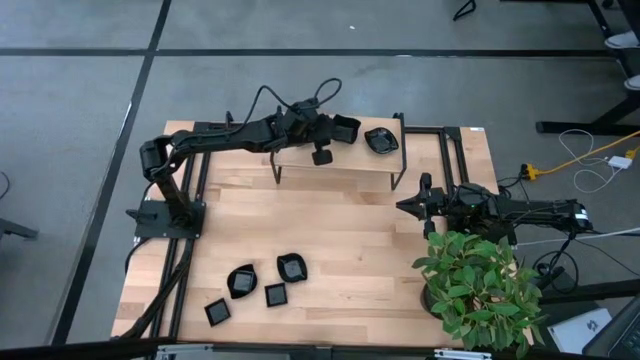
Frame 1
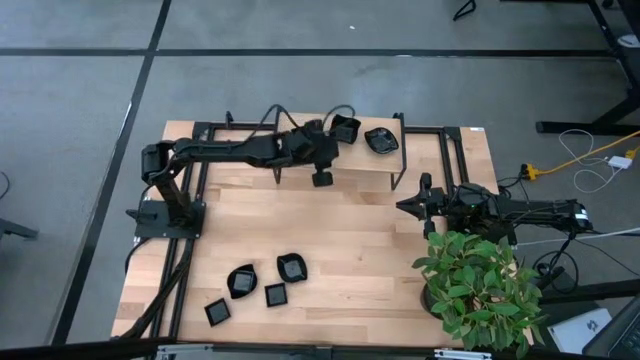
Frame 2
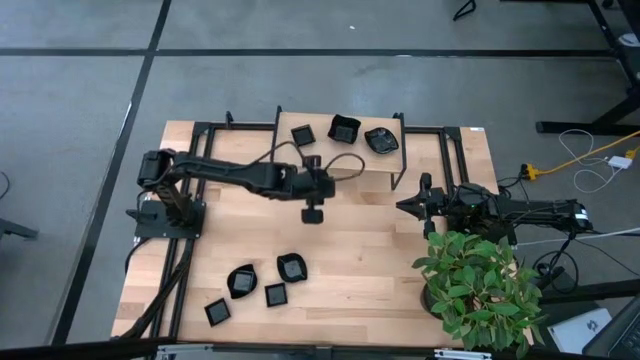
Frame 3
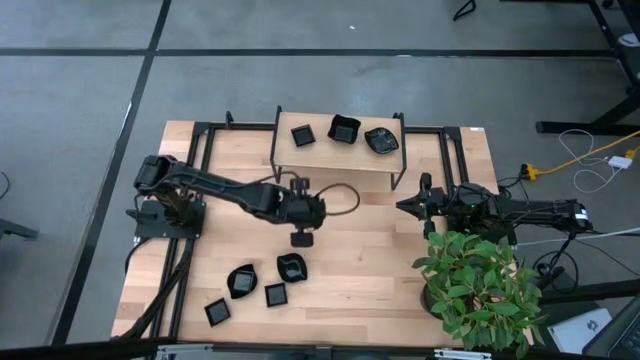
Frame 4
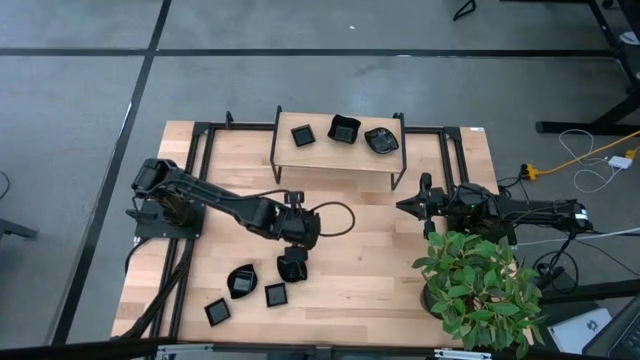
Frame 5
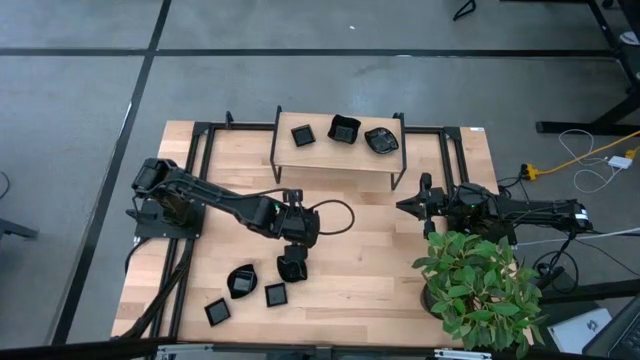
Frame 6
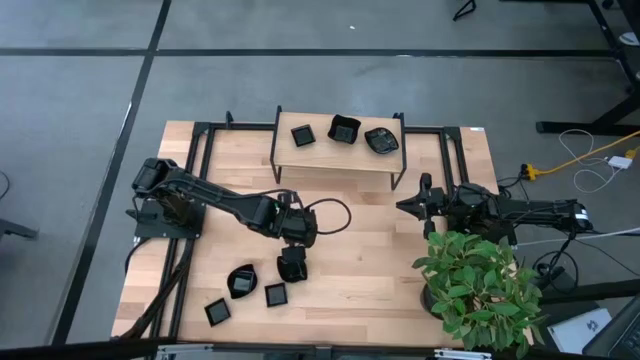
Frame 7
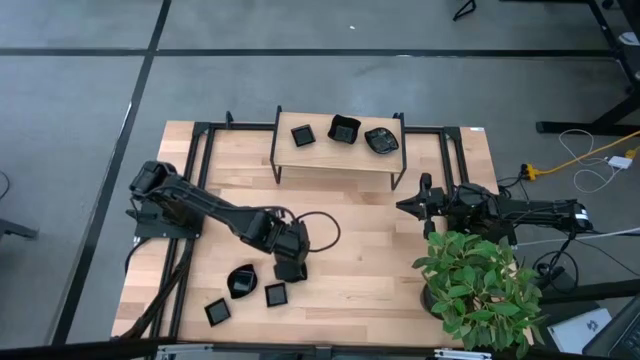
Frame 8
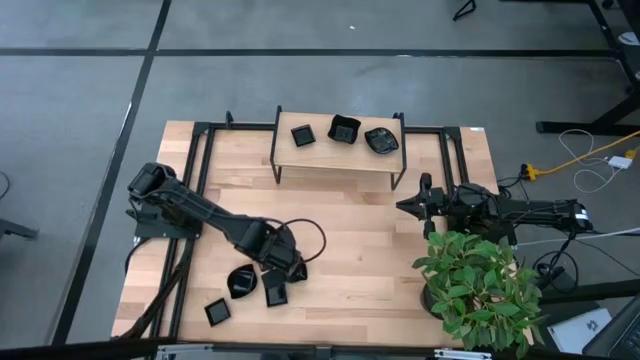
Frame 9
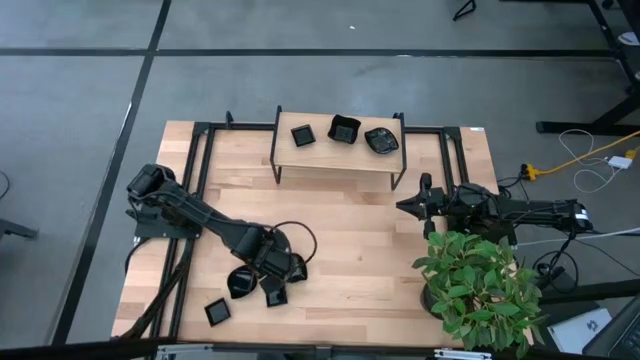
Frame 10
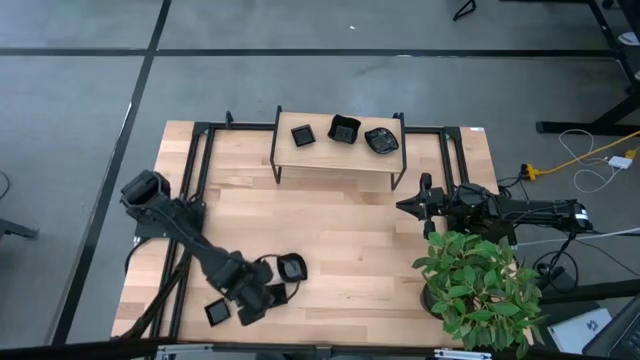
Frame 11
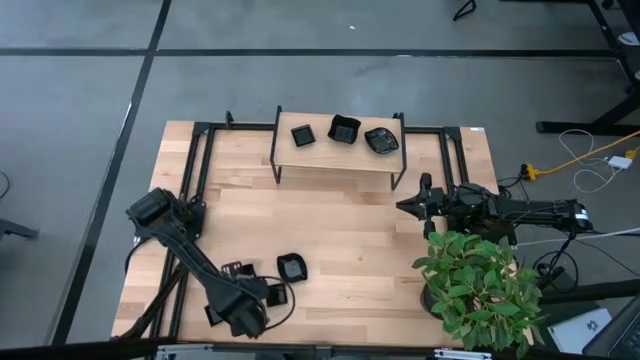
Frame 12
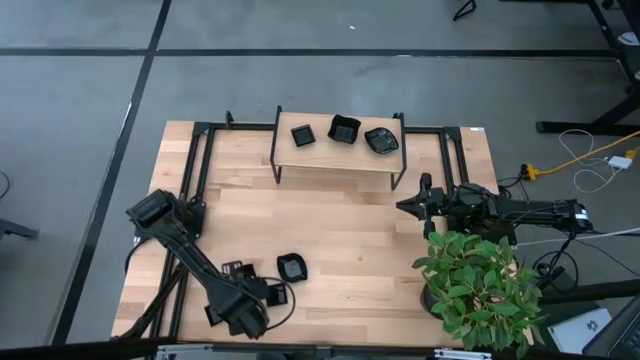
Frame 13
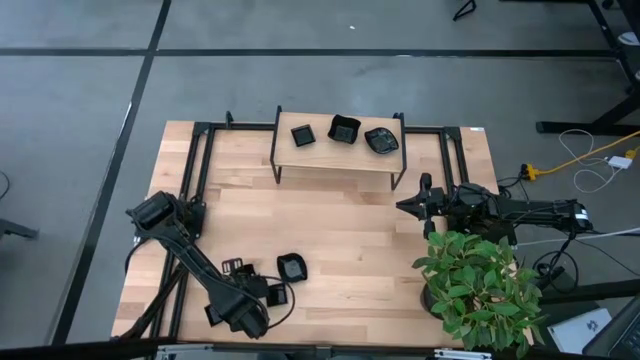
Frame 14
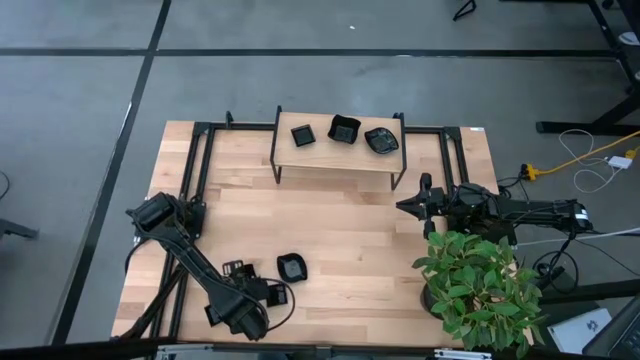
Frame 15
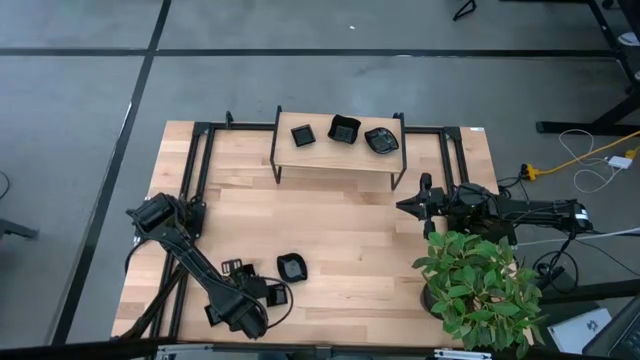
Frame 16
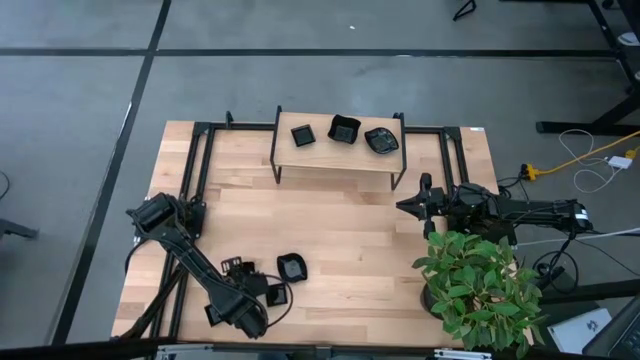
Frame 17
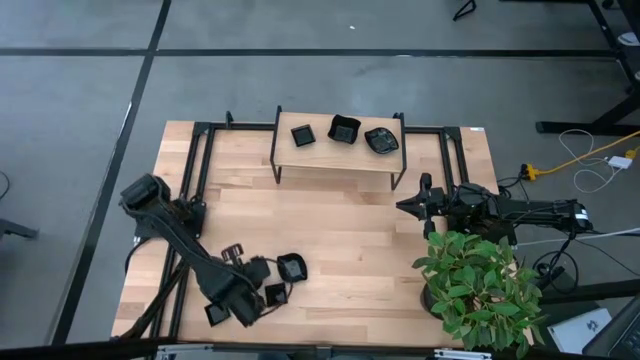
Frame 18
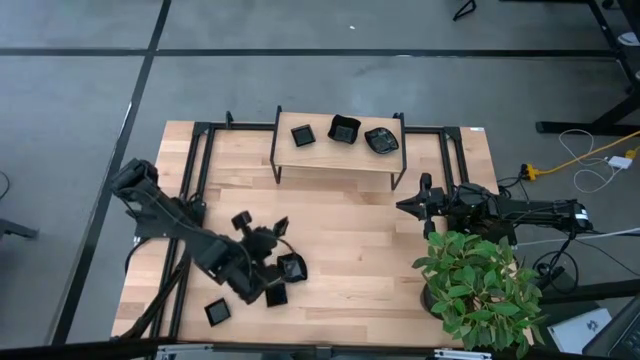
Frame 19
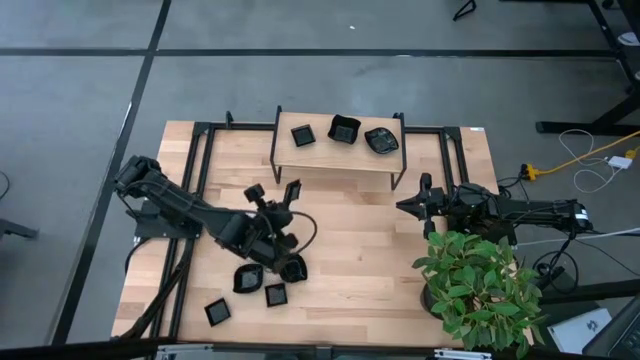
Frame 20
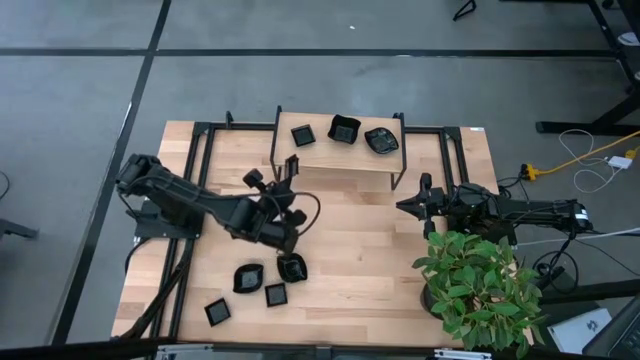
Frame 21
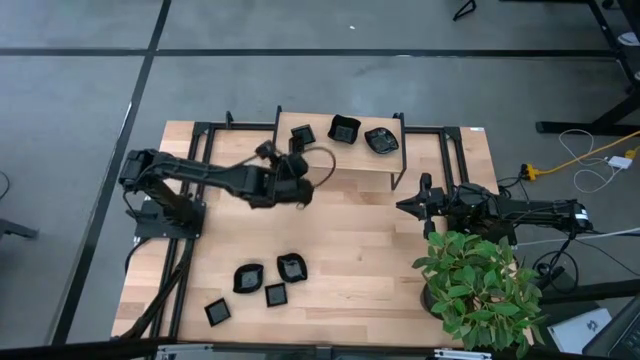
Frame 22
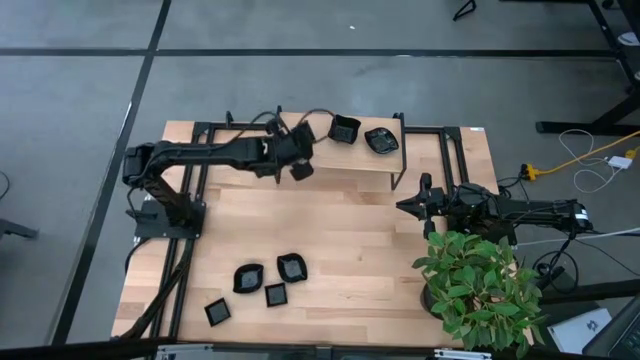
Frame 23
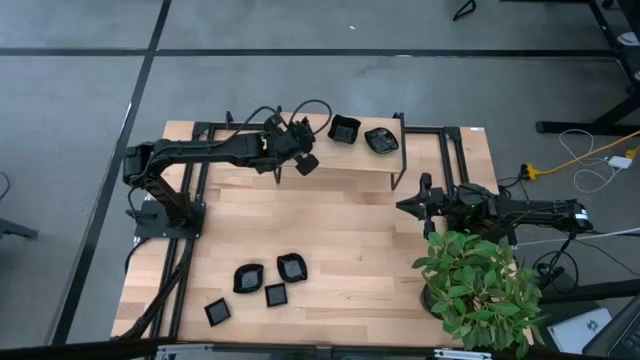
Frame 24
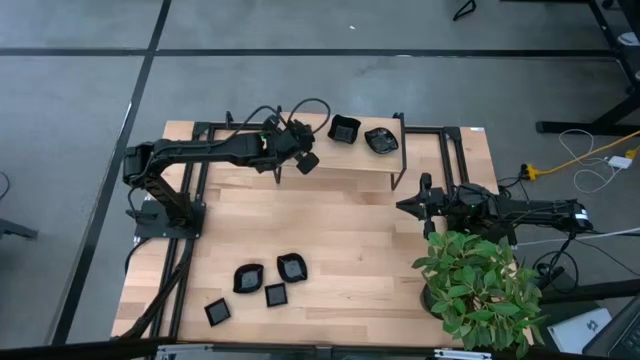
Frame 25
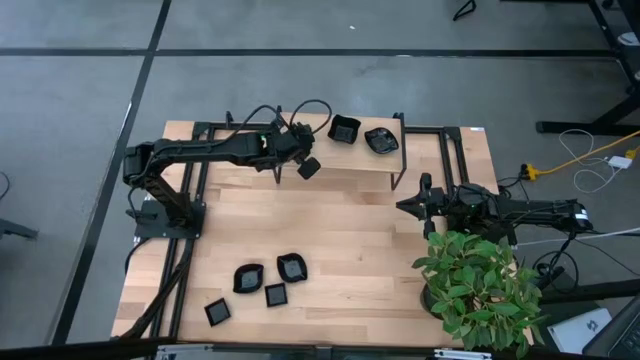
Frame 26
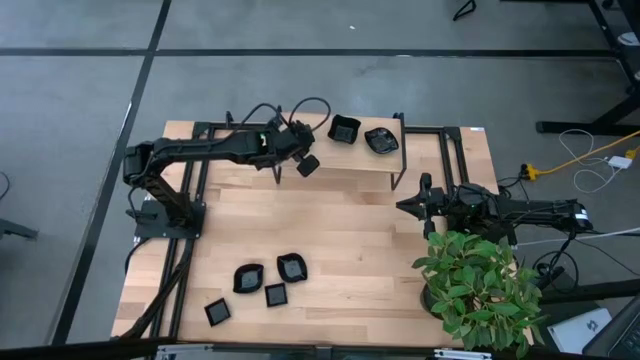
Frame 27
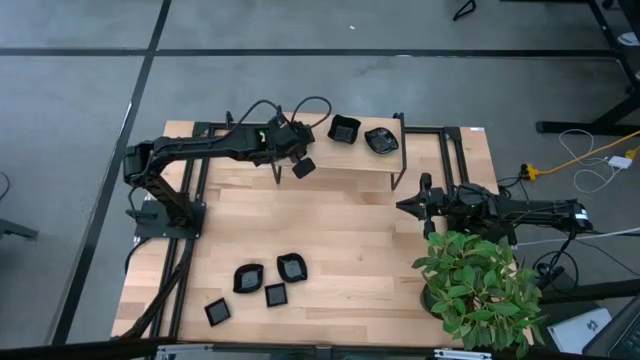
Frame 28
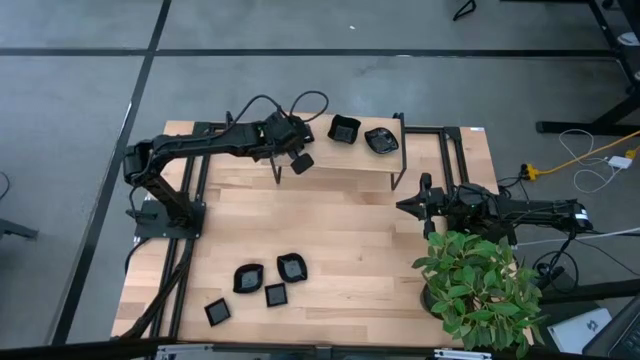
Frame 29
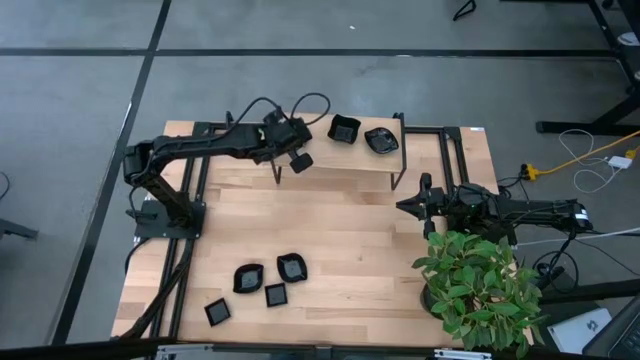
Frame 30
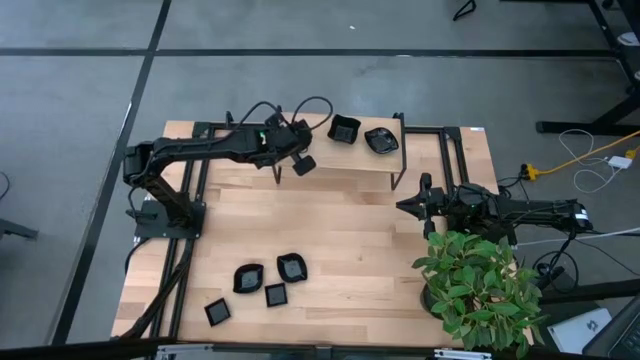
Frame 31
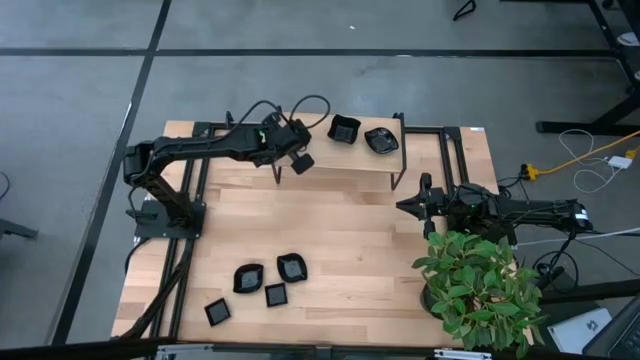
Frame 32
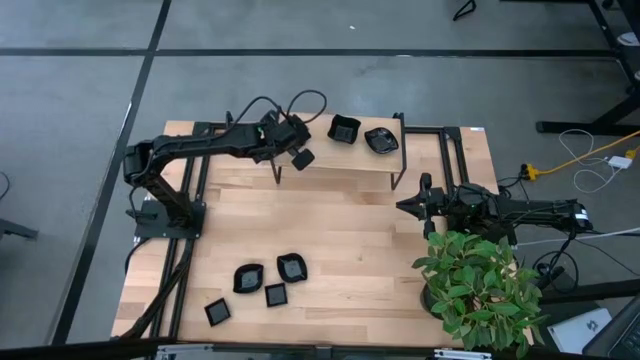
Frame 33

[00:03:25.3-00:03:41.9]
Task: Pick & Place Mini shaped plates
Stack the square plate on top of the square plate on the shelf

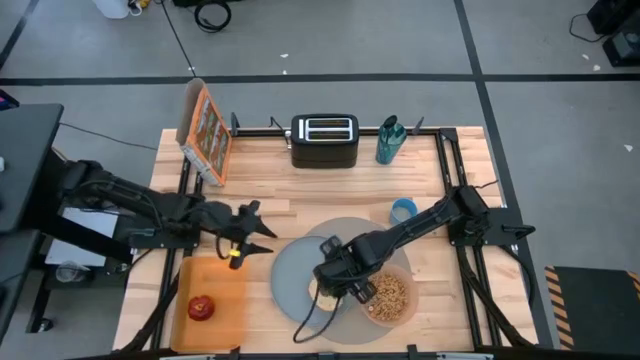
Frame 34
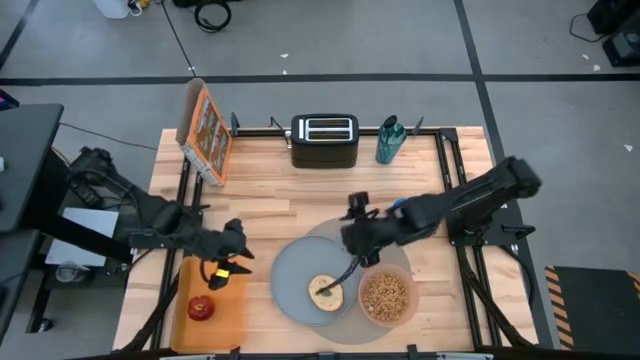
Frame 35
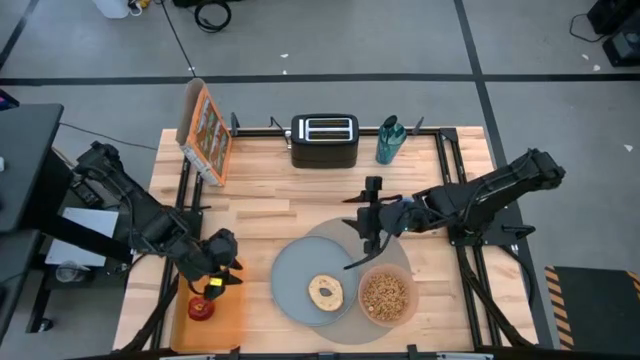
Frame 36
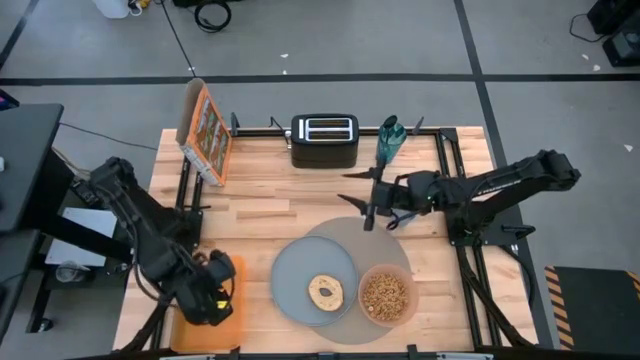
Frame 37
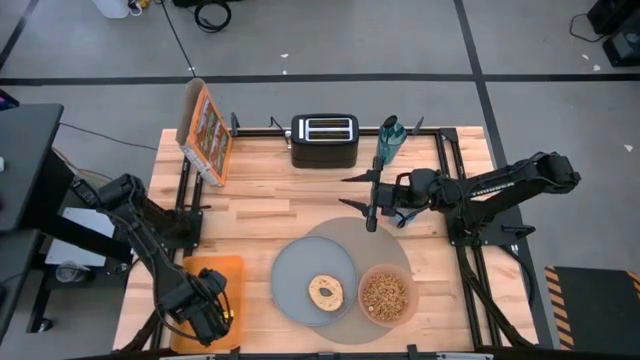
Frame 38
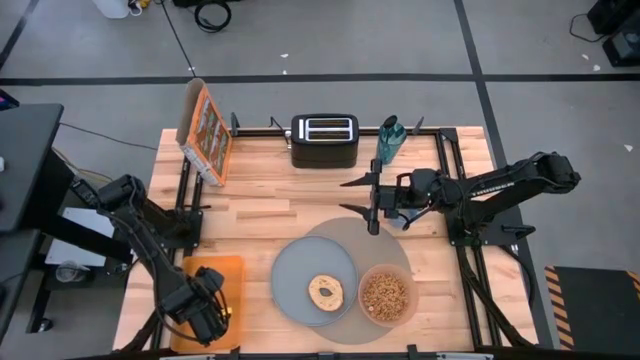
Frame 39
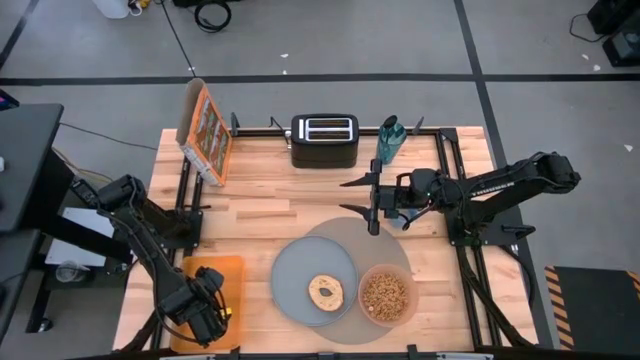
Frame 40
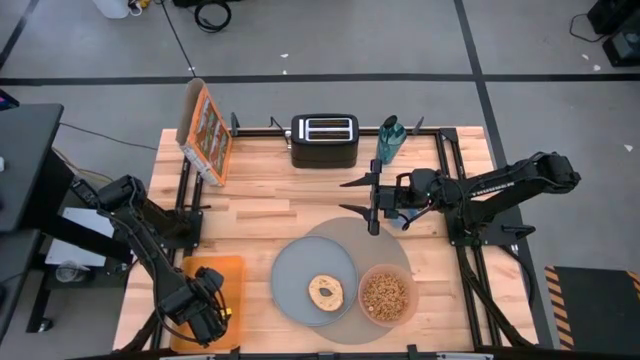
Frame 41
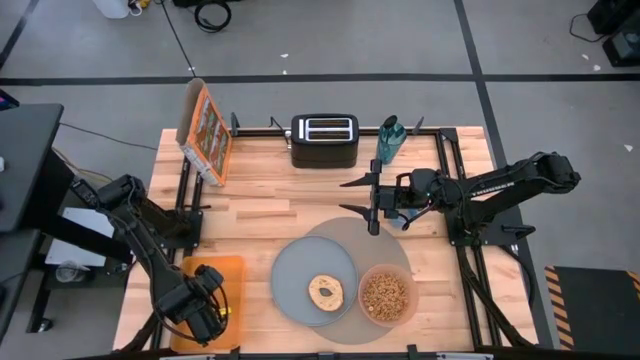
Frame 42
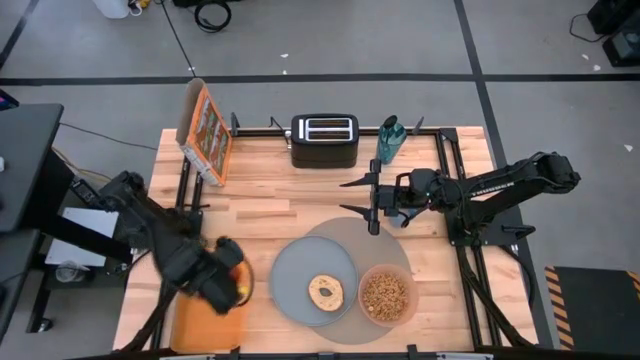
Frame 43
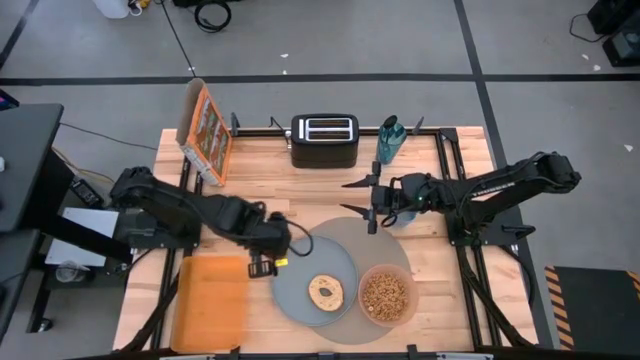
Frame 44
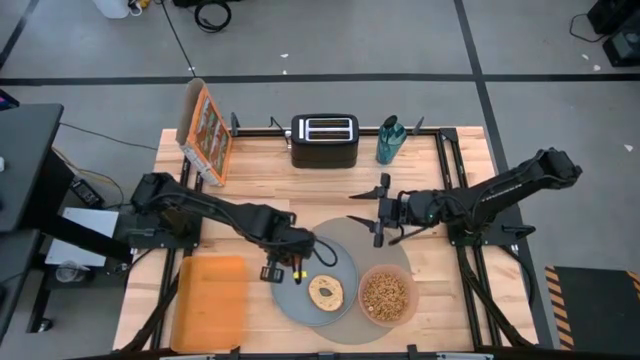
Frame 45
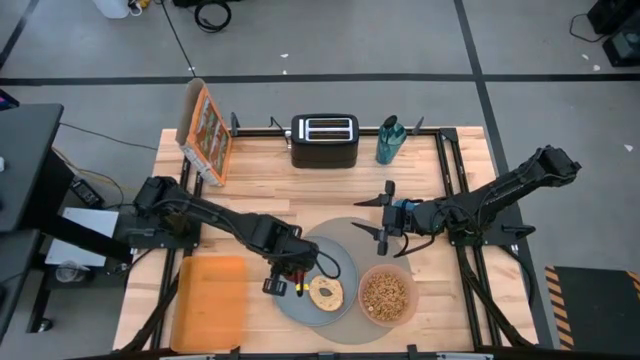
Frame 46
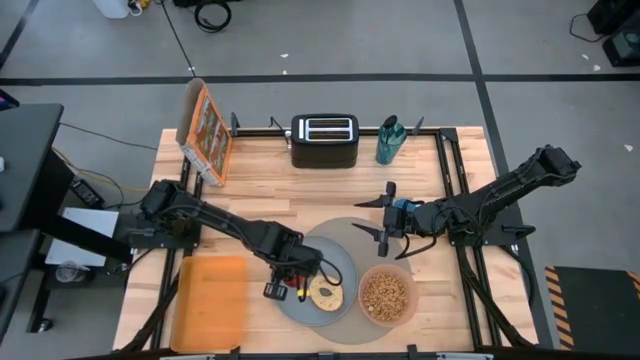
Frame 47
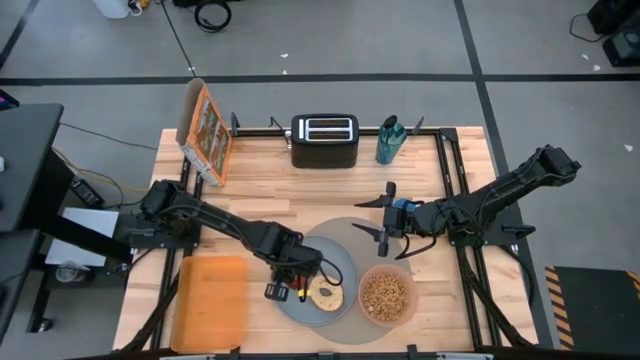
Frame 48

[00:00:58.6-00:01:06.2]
Task: Arrange a breakfast setting
Put the apple from the orange bin on the blue plate on the brown placemat
